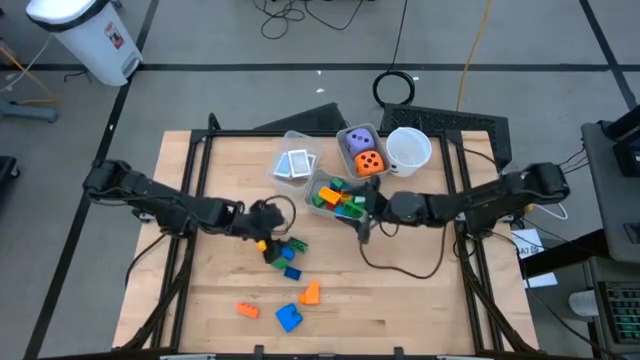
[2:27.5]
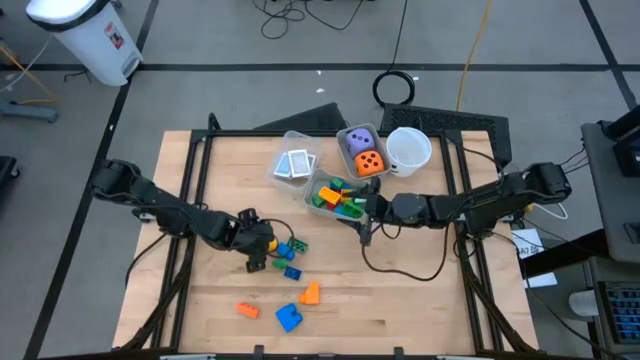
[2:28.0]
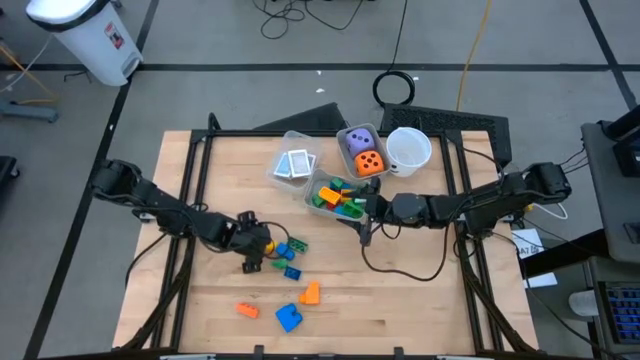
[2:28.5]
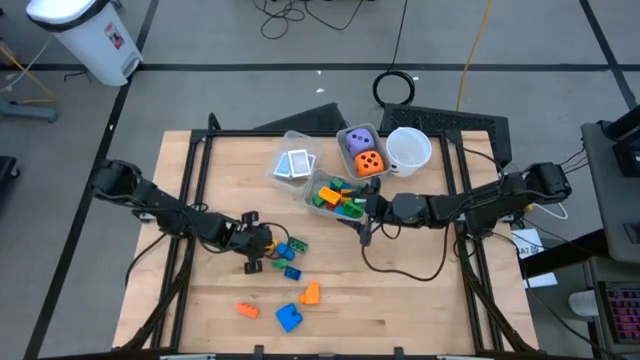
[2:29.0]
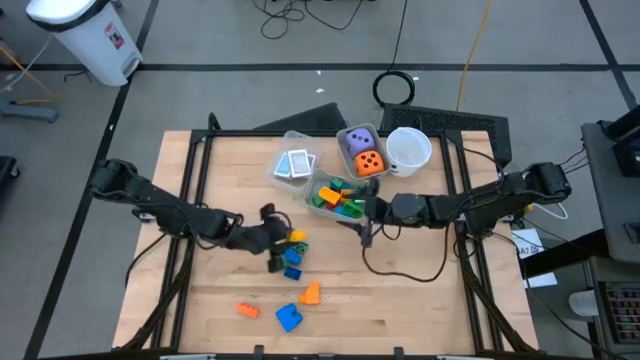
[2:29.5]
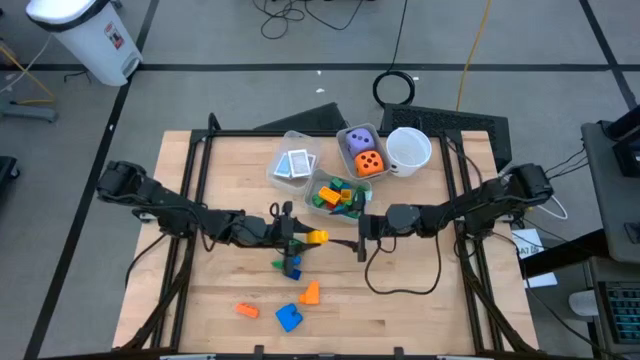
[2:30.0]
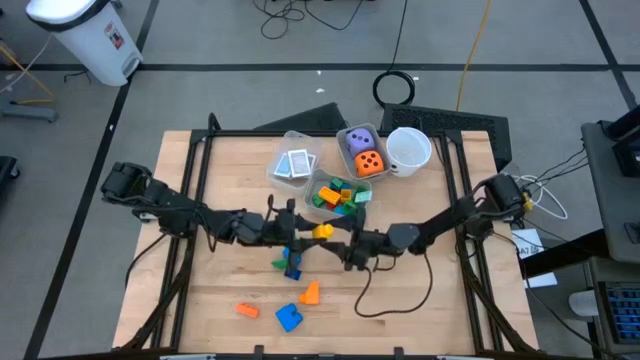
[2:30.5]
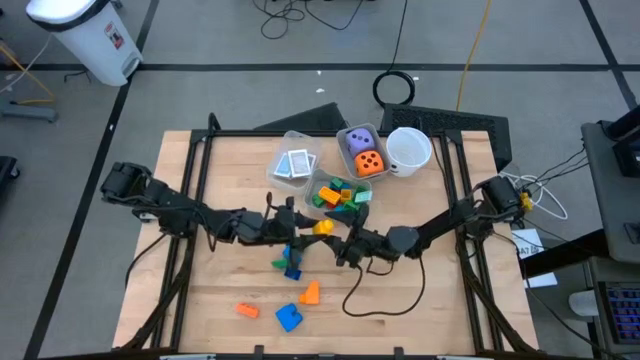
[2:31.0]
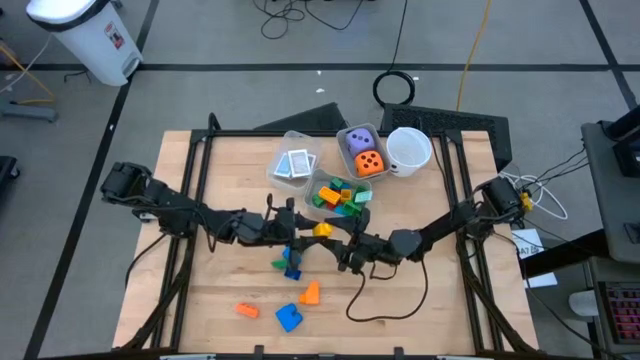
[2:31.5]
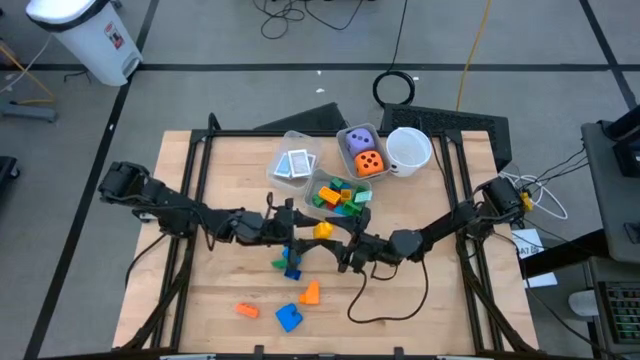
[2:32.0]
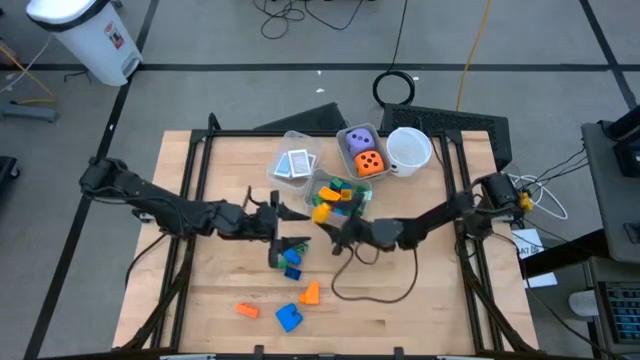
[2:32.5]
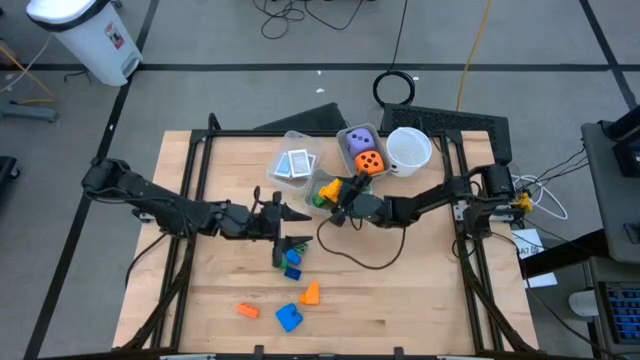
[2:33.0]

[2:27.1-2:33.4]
Task: Pick & Place Toys
Put the yellow game piece into the bottom gray bin

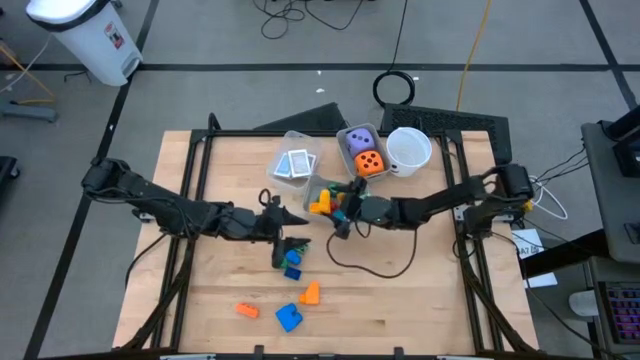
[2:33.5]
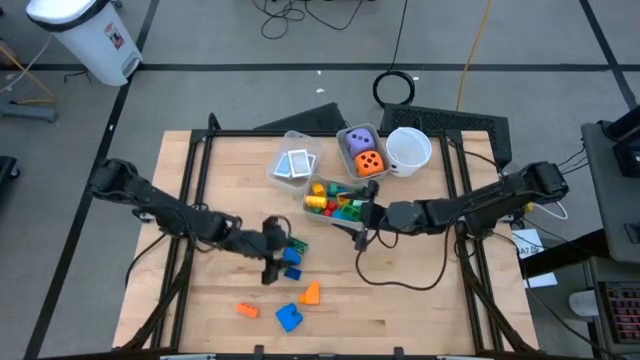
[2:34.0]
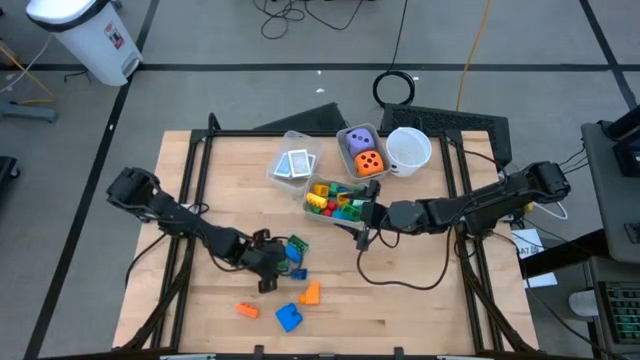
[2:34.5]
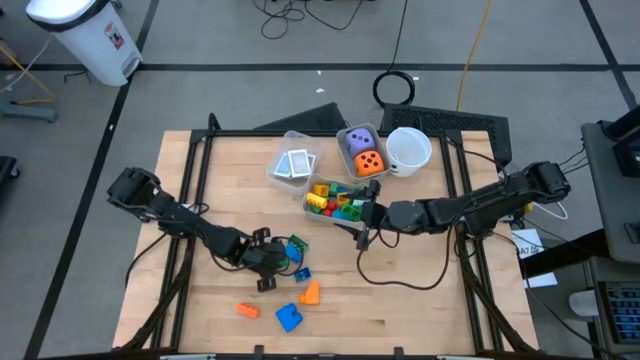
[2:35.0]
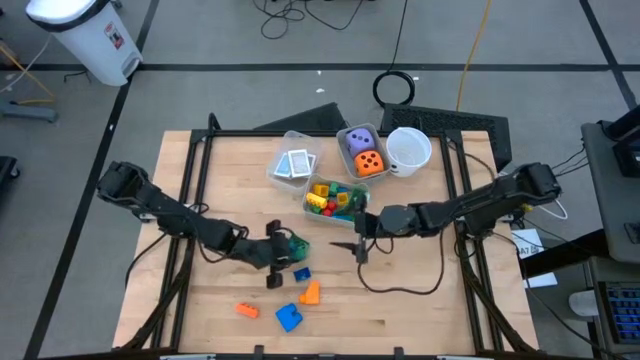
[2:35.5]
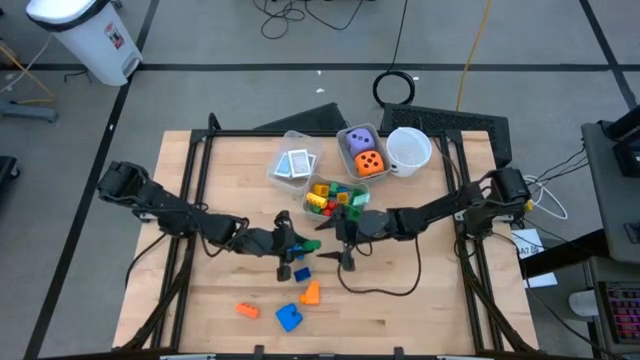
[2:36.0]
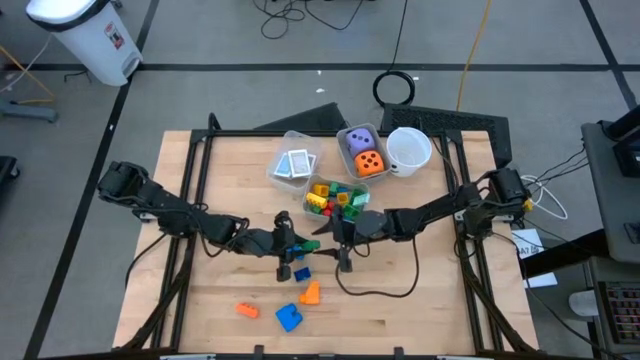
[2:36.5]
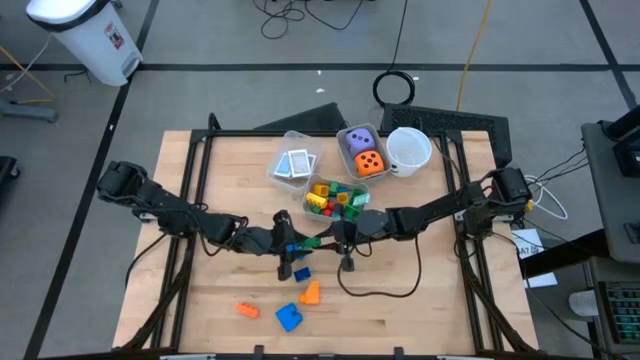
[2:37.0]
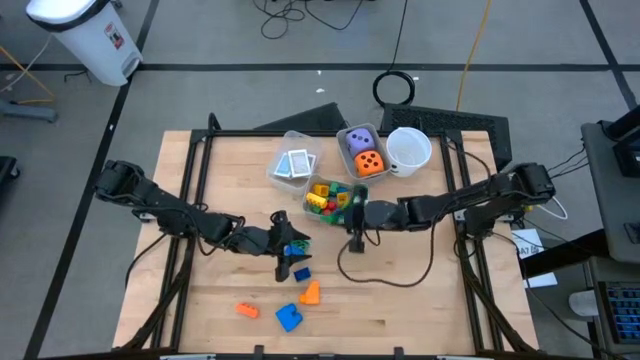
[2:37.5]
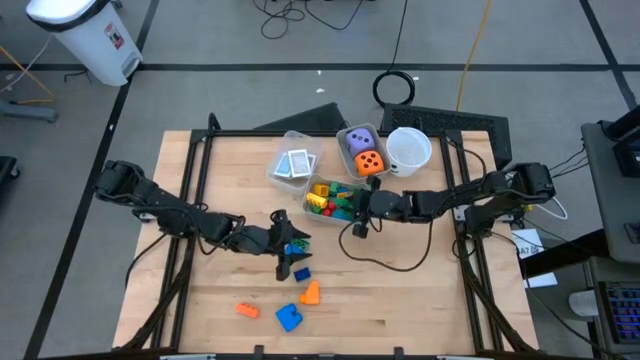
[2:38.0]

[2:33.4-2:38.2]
Put the green game piece into the bottom gray bin

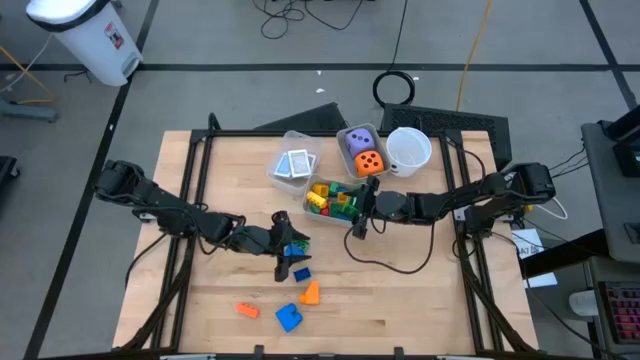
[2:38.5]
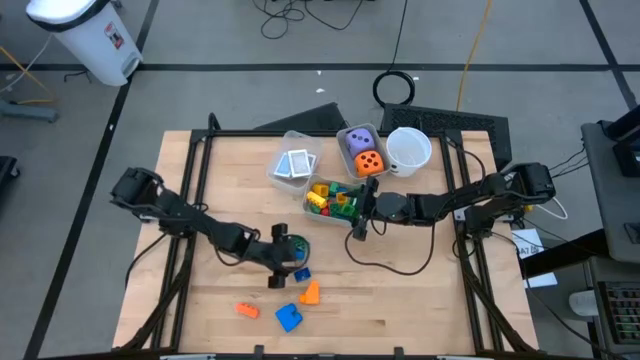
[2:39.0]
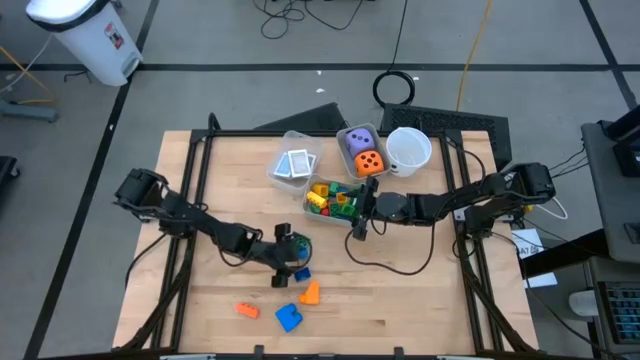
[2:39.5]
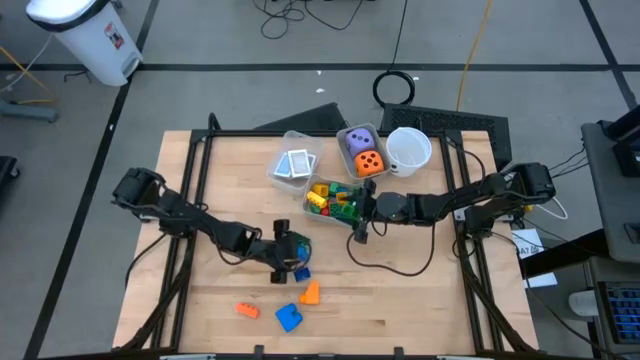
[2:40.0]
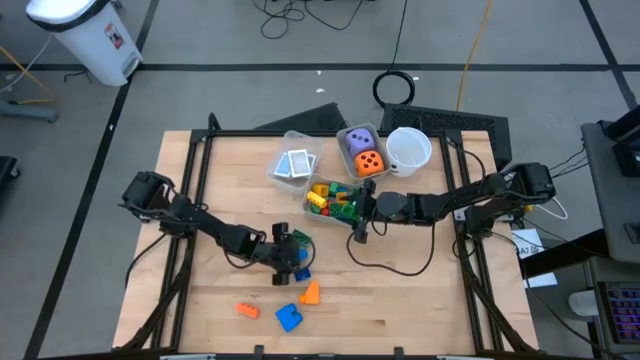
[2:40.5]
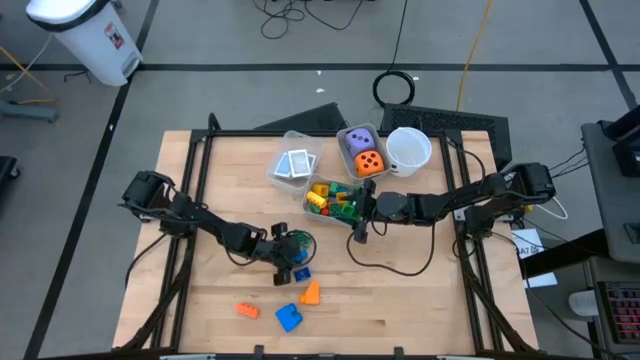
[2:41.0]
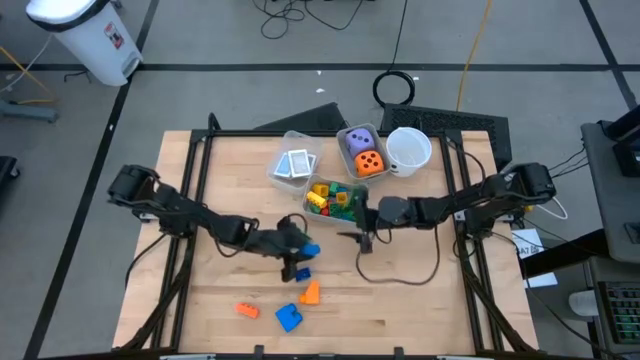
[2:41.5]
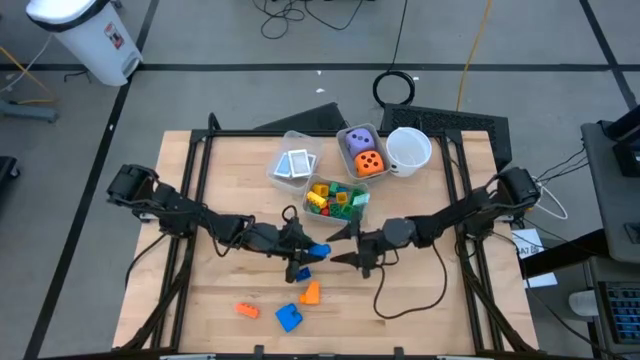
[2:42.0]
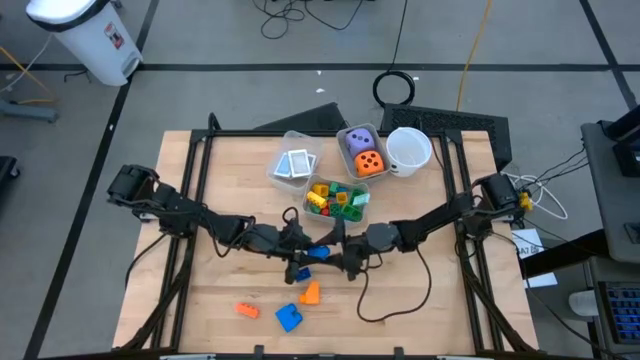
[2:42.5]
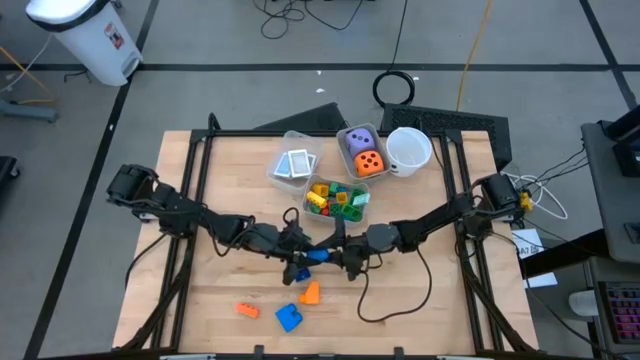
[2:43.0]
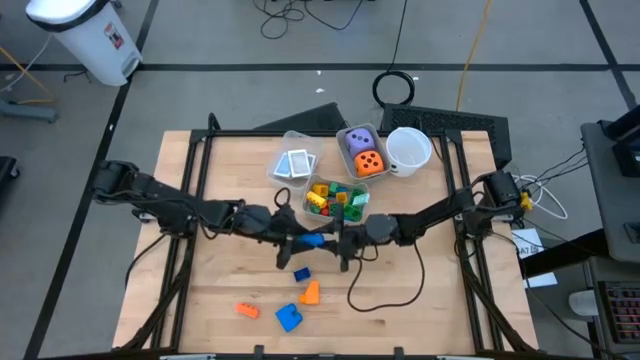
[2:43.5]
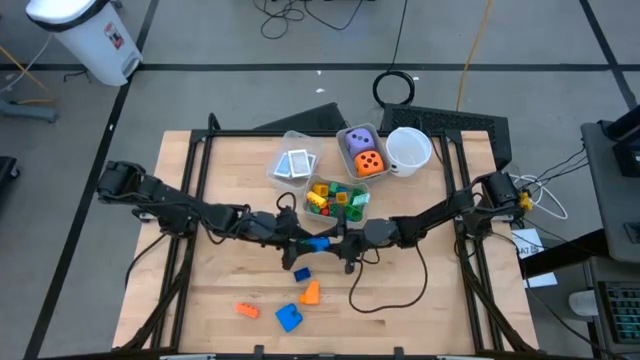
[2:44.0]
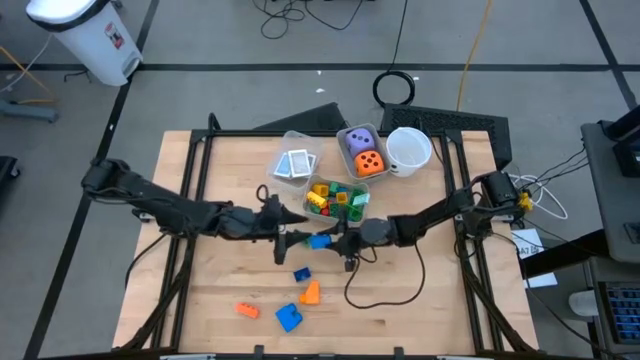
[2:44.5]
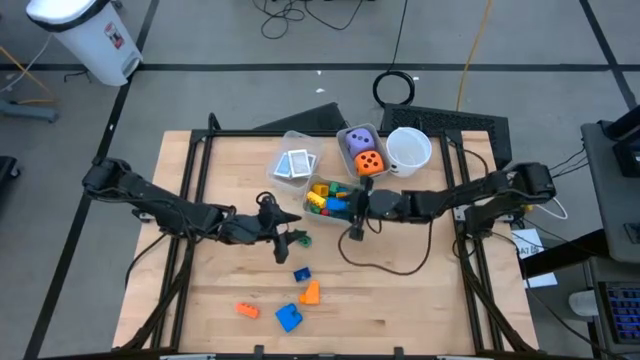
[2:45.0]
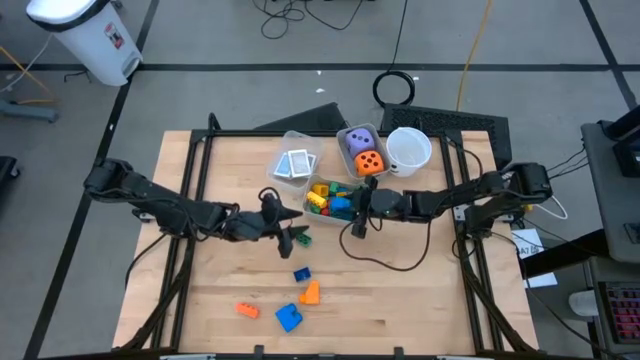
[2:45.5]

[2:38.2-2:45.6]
Put the blue game piece into the bottom gray bin

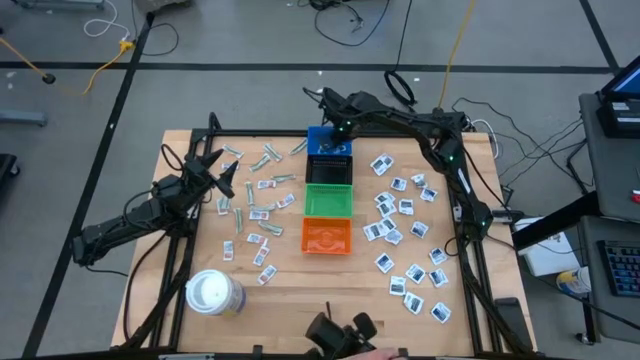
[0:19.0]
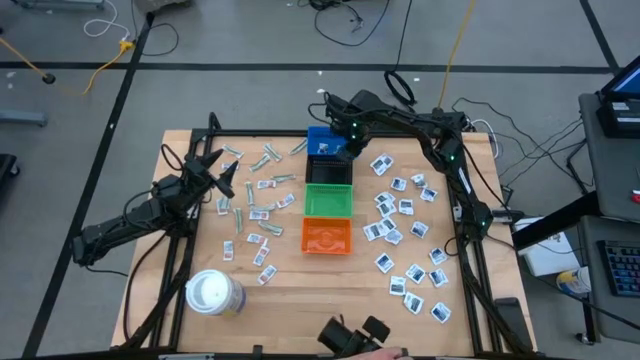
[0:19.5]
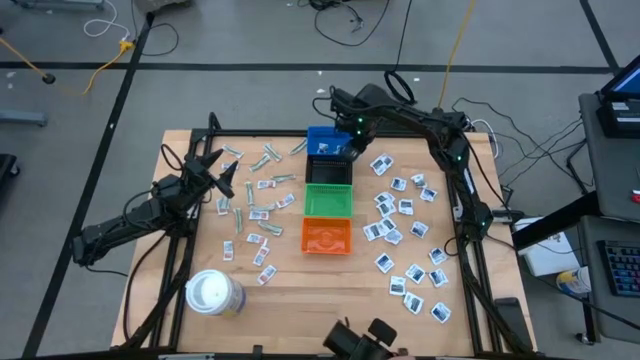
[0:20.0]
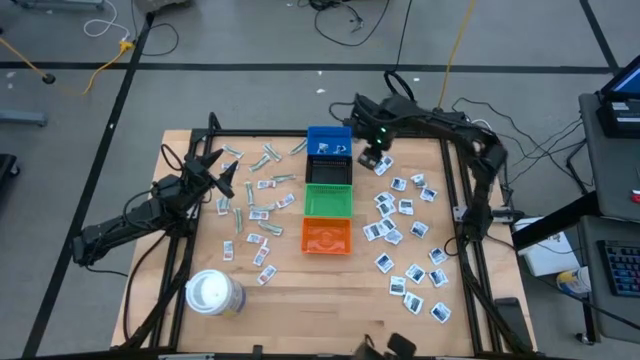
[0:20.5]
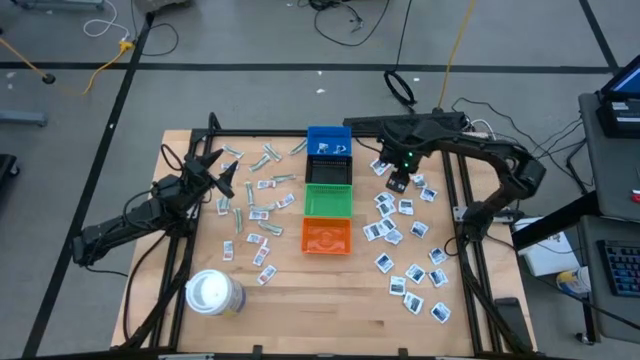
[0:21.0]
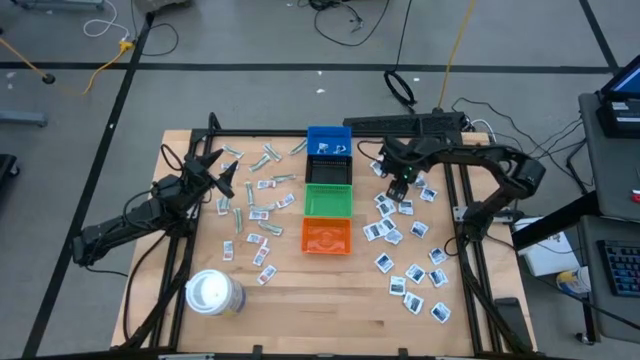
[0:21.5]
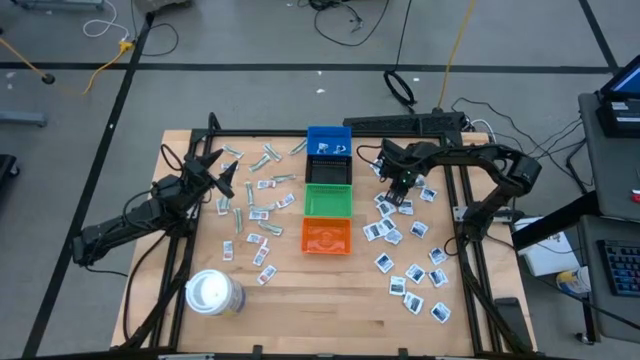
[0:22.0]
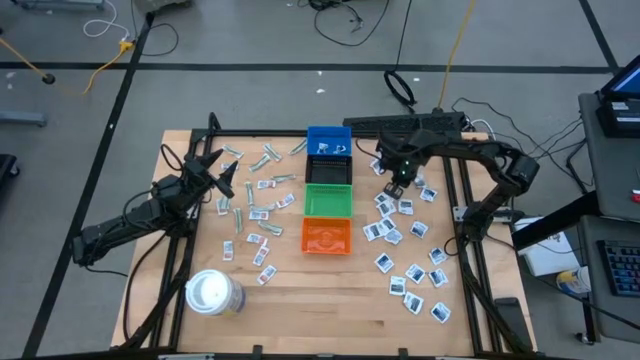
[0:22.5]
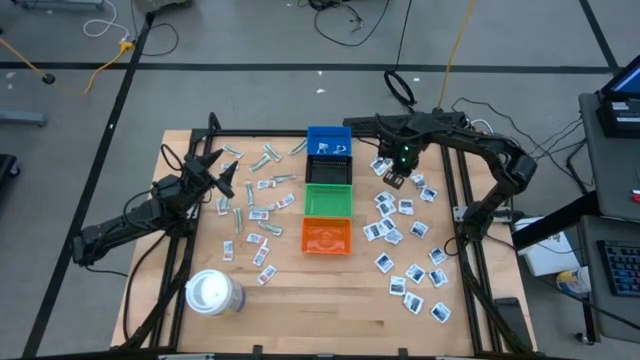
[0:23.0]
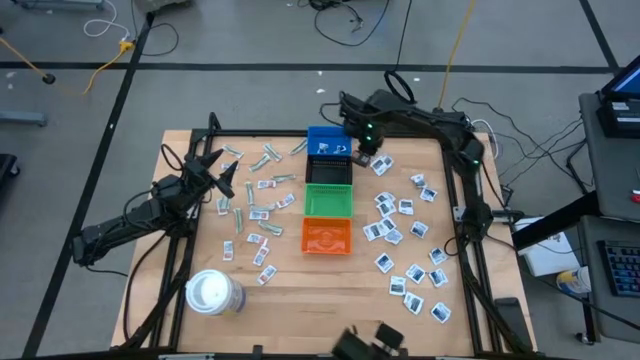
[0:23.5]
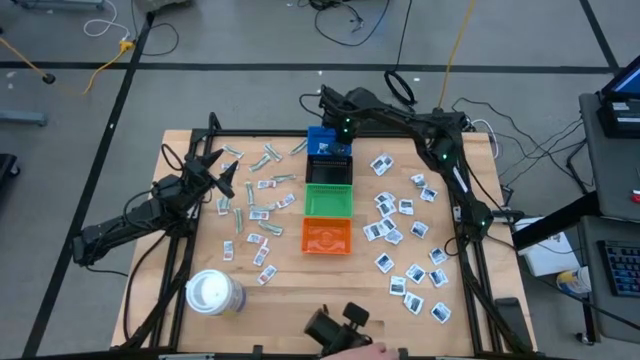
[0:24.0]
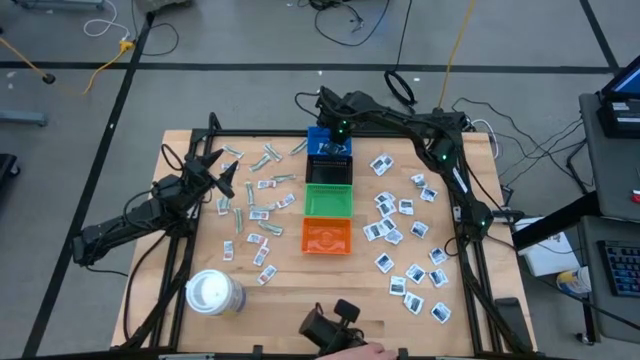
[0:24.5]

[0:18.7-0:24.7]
Task: Pick & Place First Aid Supplies
Put the blue alcohol pad into the blue bin
